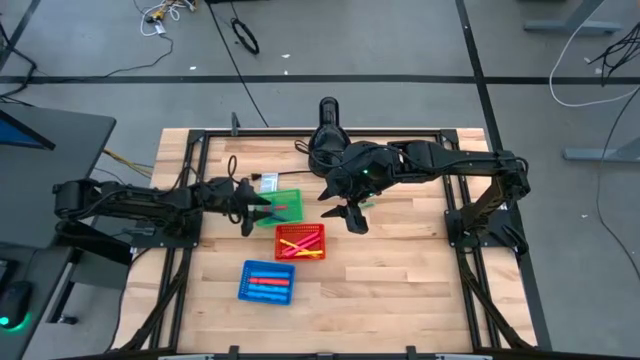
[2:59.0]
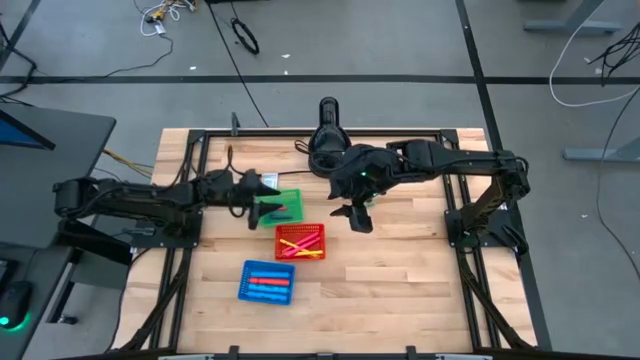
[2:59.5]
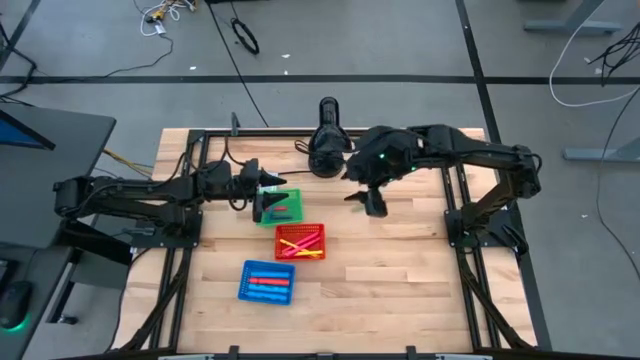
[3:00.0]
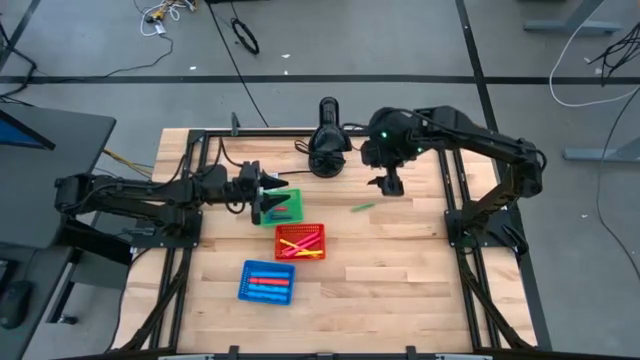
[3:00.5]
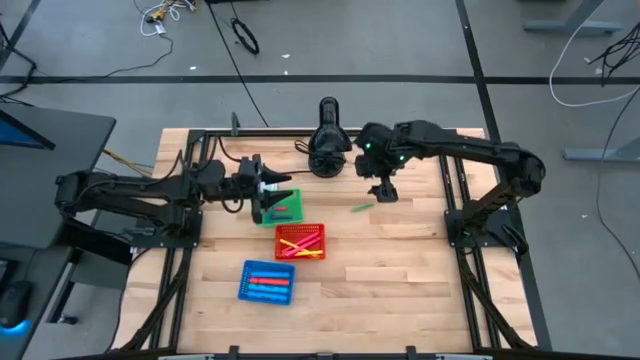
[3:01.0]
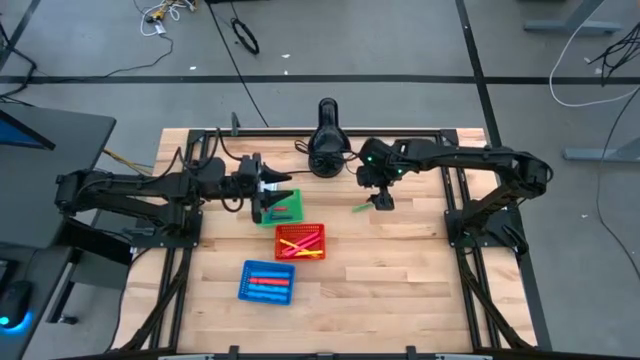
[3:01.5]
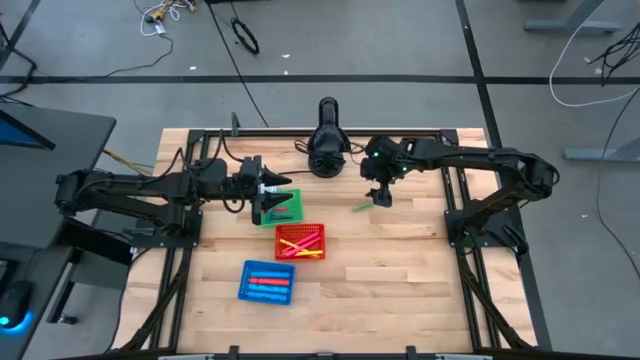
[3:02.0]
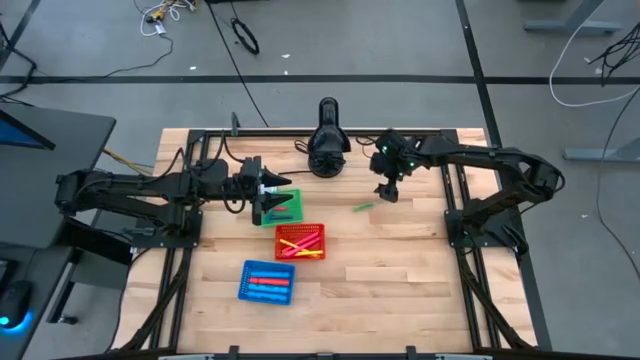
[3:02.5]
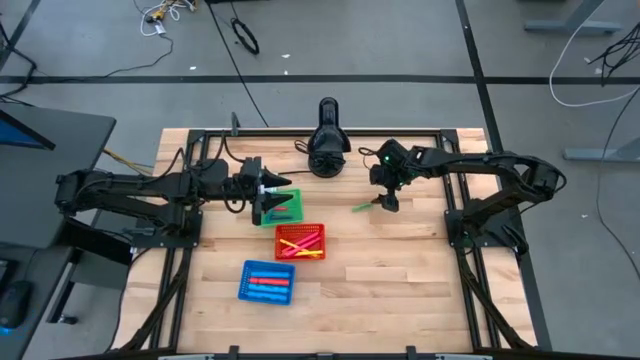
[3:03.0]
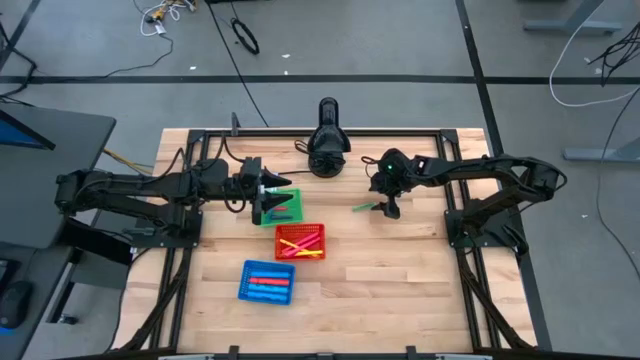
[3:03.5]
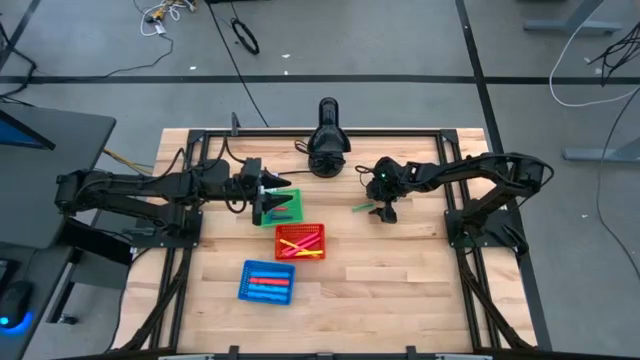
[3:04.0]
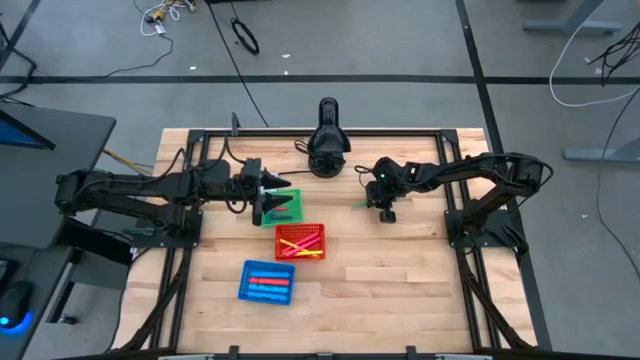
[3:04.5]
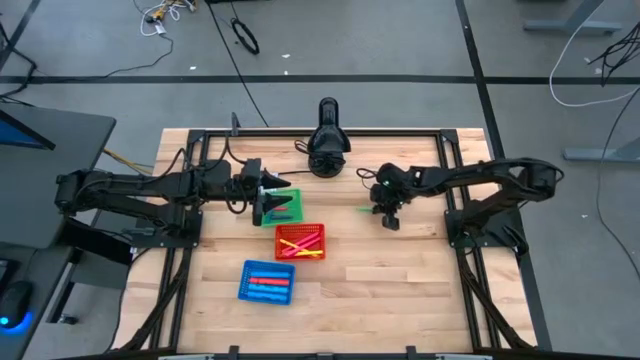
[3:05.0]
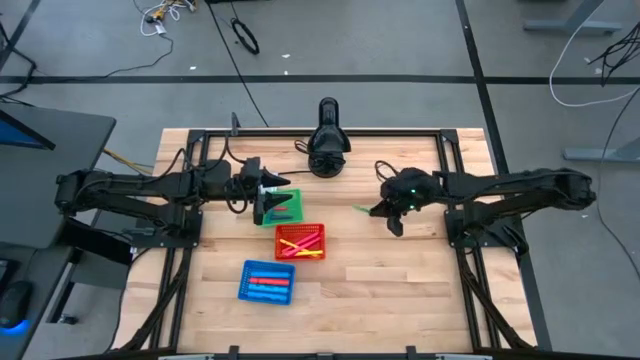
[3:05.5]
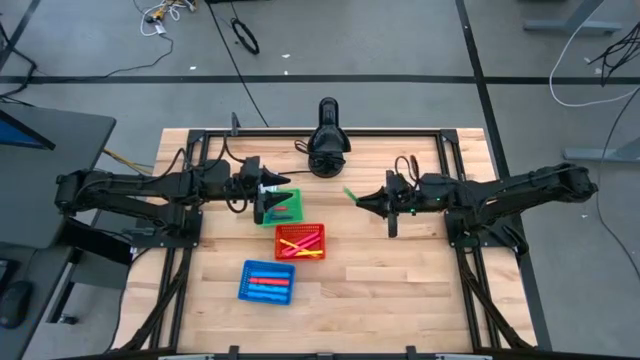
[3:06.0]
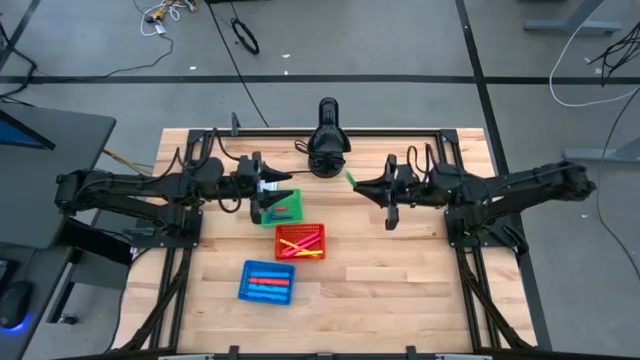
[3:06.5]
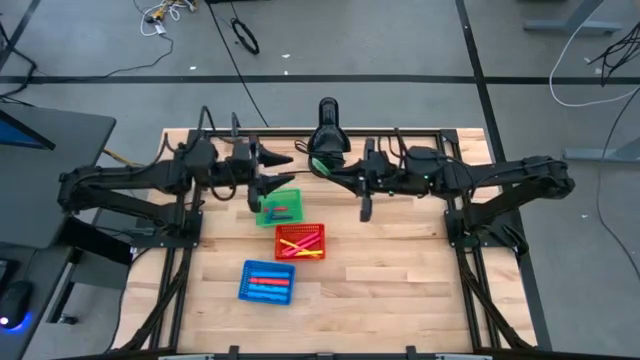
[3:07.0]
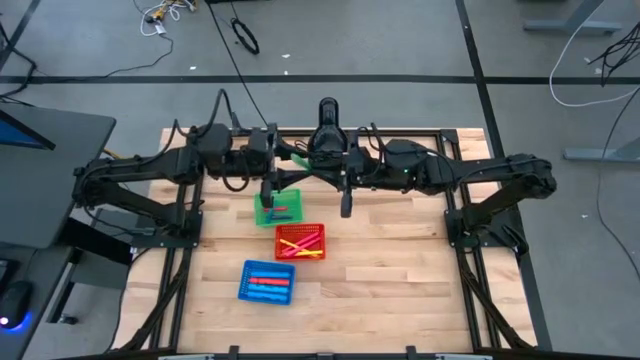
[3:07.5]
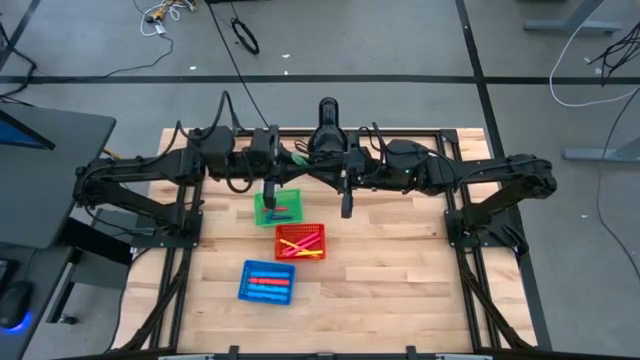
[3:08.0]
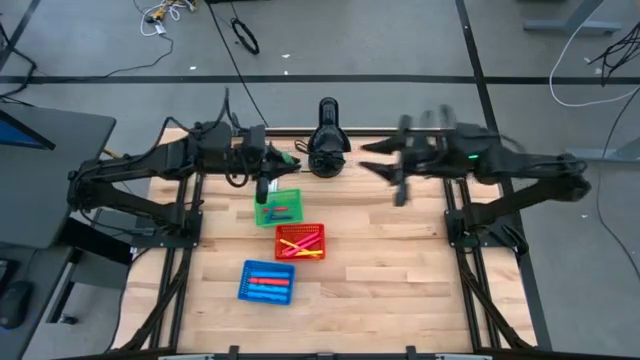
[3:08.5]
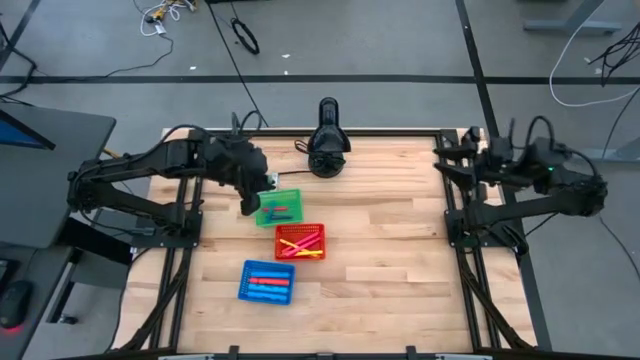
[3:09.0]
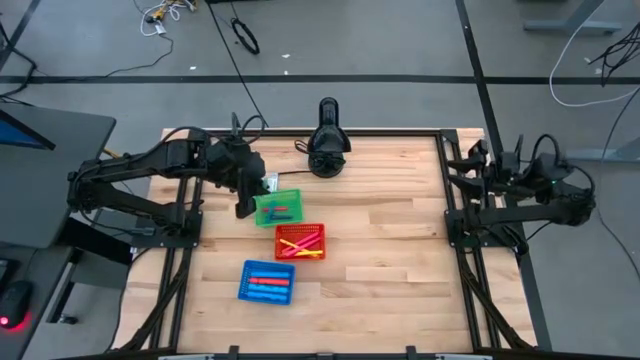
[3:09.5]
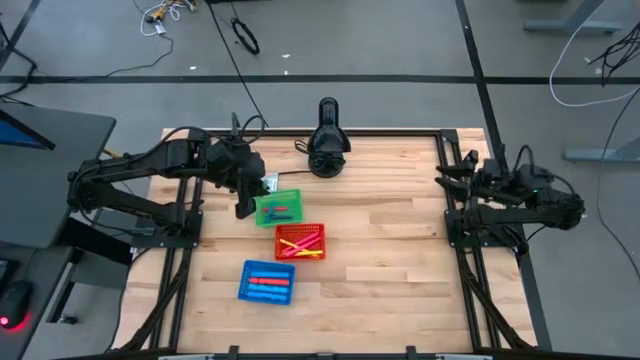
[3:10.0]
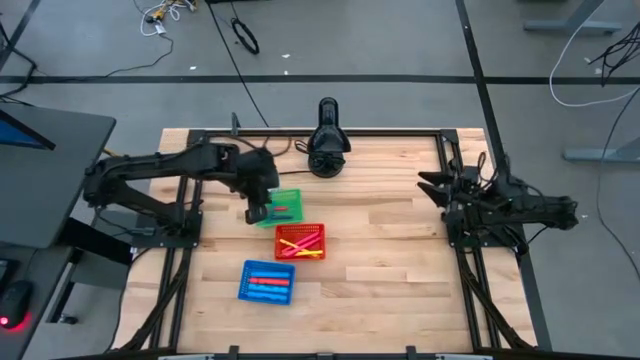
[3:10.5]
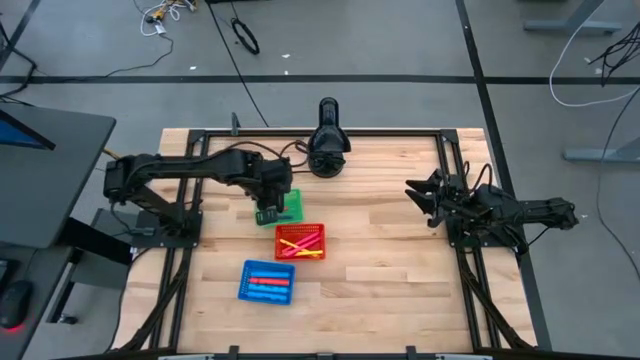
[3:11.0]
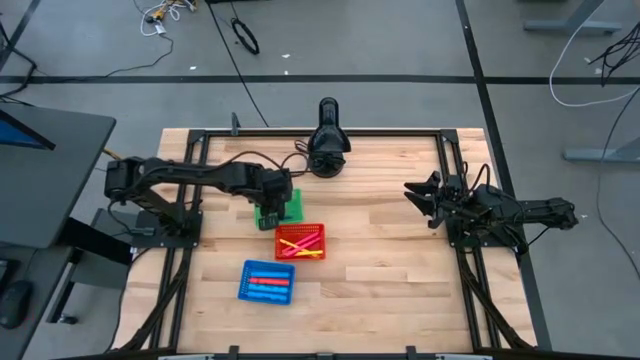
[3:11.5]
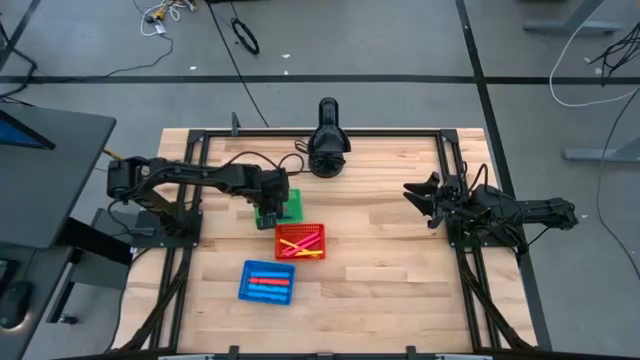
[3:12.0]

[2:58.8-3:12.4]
Task: Pick & Place Markers
Put the green pen into the green bin

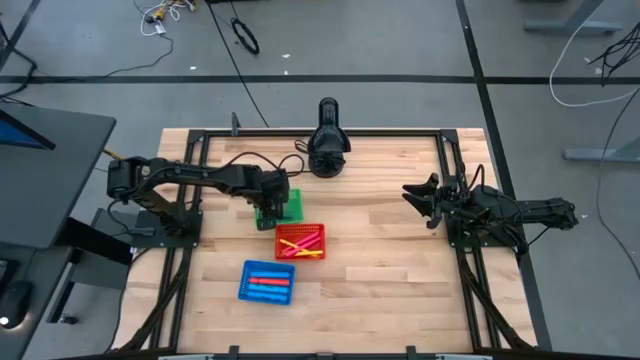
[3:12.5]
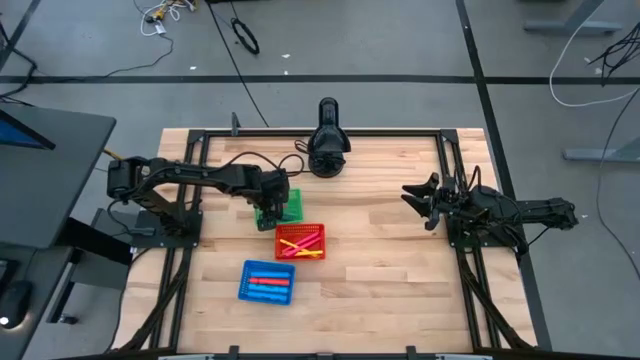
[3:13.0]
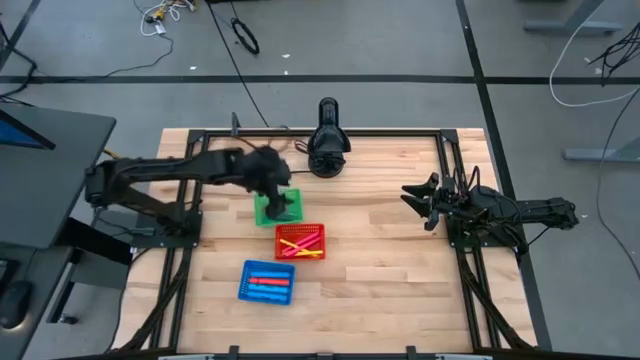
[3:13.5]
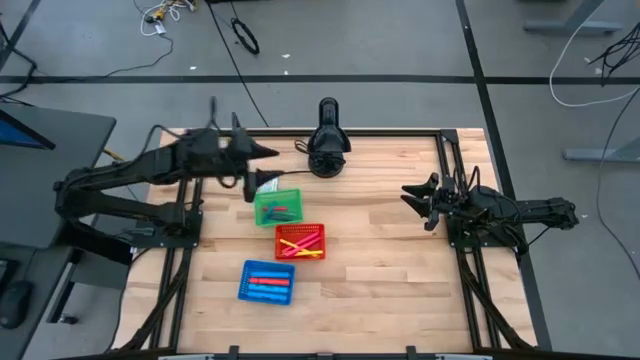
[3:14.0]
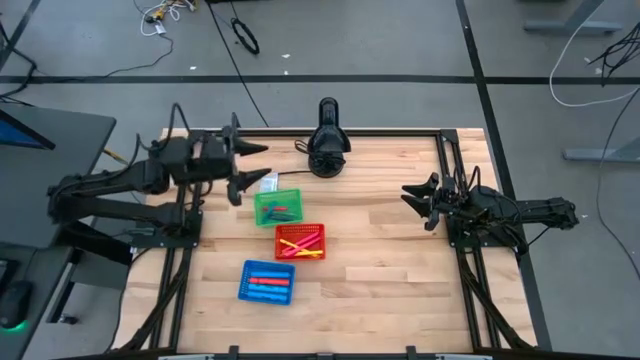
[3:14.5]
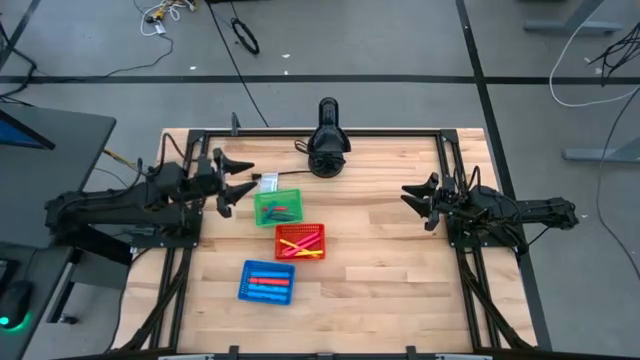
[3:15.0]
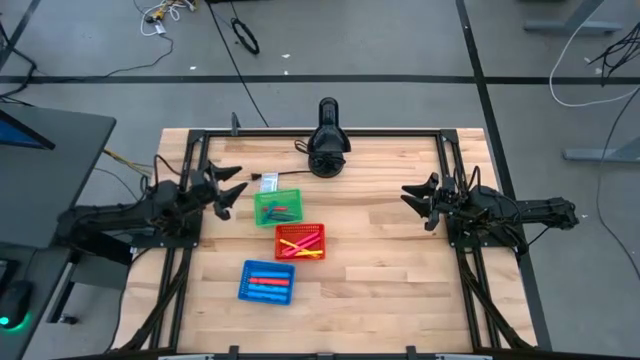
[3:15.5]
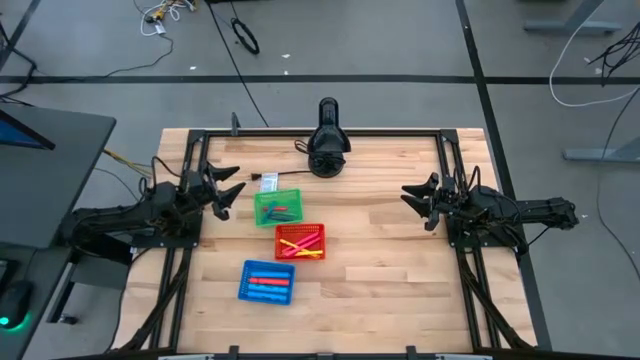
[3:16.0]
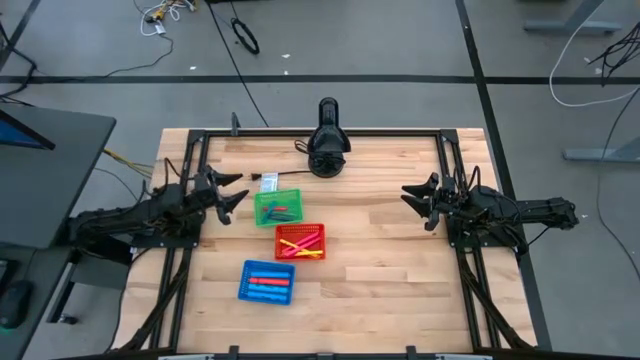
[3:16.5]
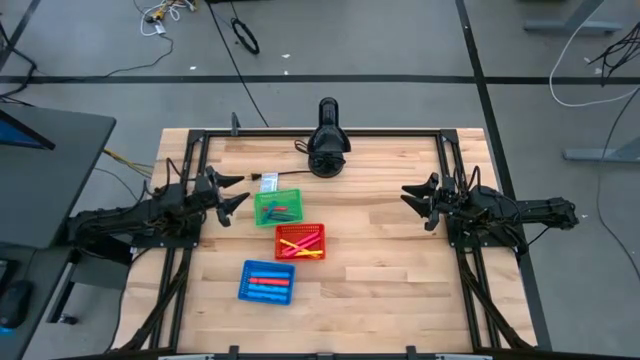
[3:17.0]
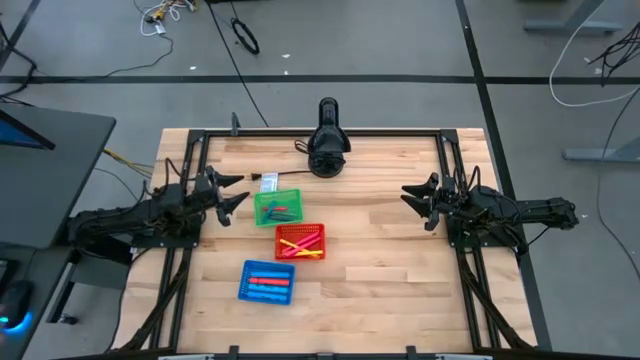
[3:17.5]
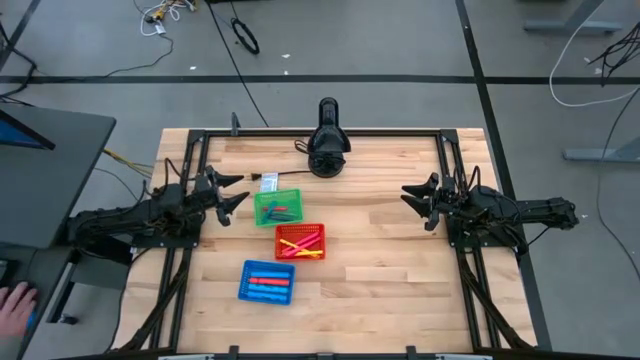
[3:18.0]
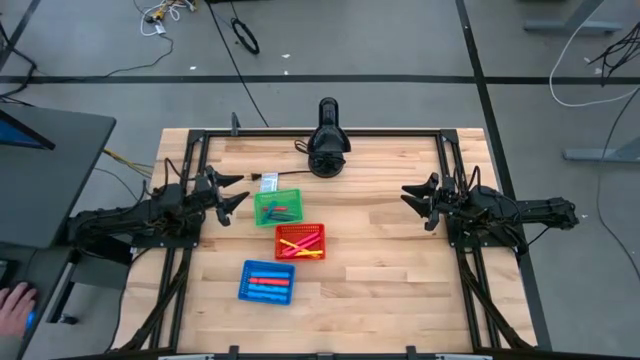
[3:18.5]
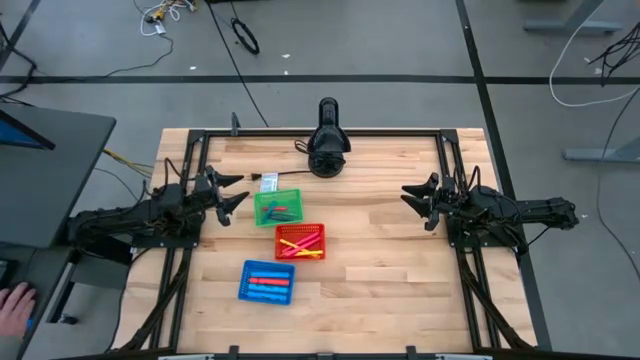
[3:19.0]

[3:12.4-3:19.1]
Return to Home Position

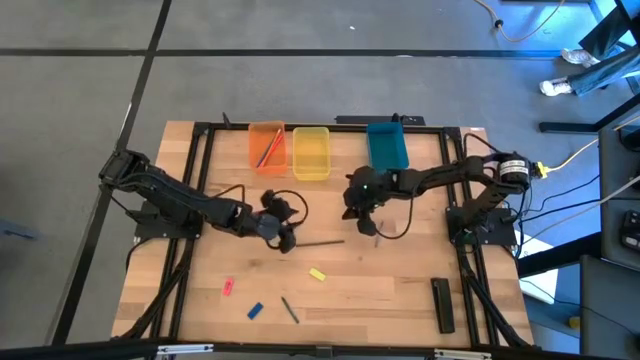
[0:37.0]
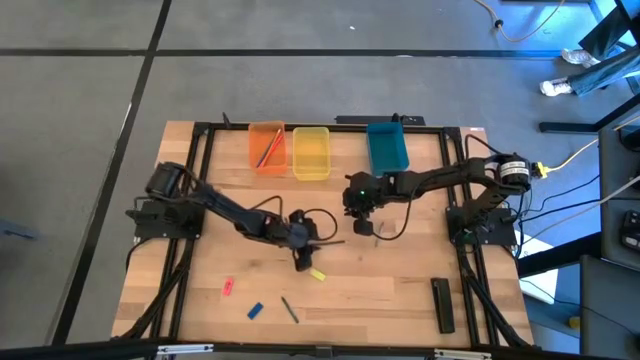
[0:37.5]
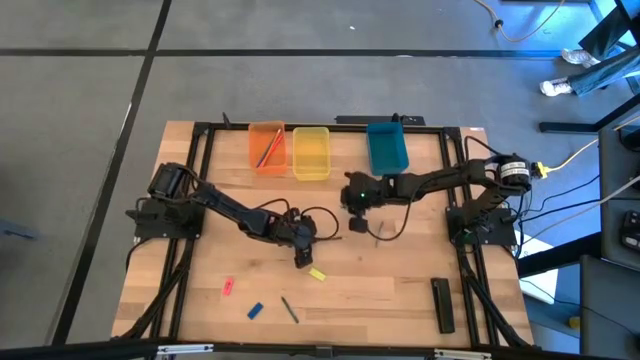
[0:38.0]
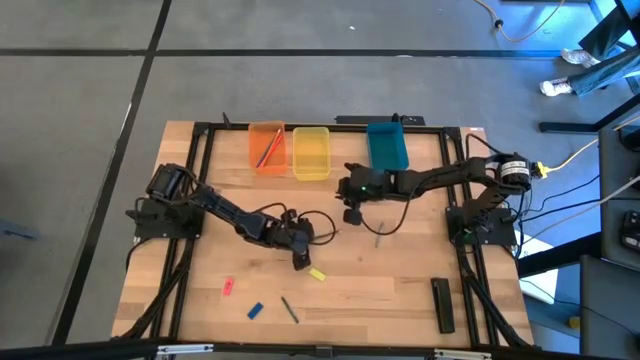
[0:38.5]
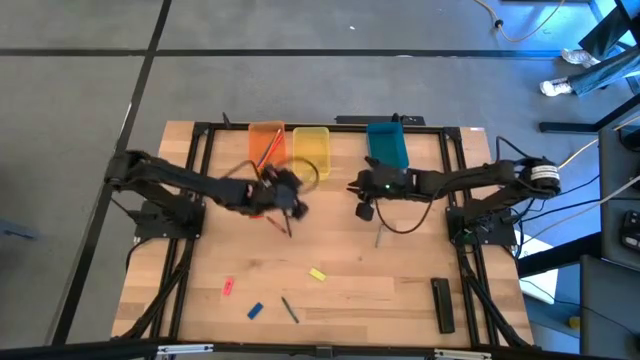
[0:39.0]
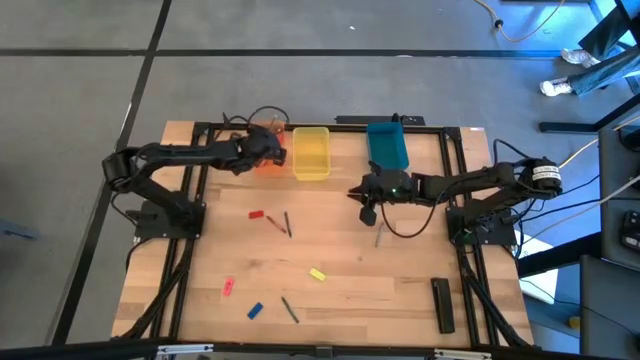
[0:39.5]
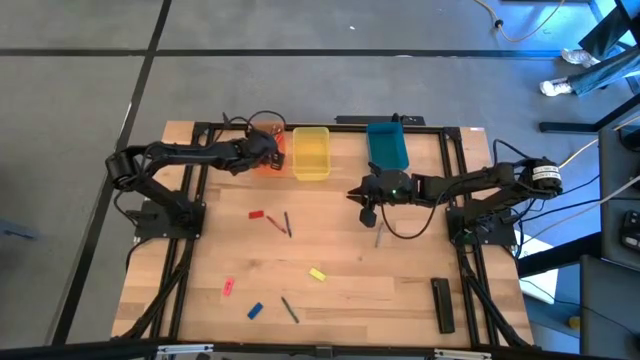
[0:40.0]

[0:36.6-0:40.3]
Task: Sort crayons/erasers/pens/pencils in bins
Put the black pencil into the orange bin
